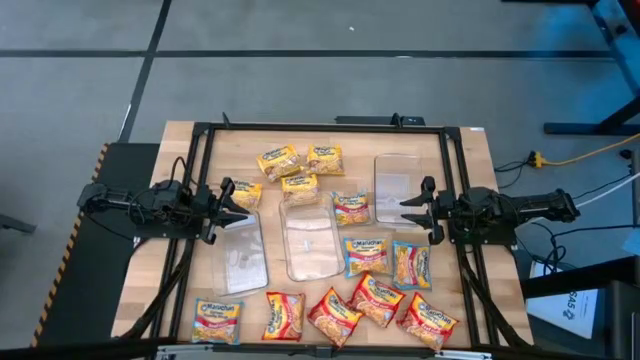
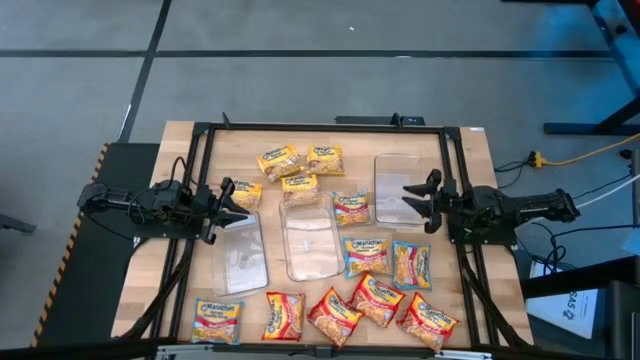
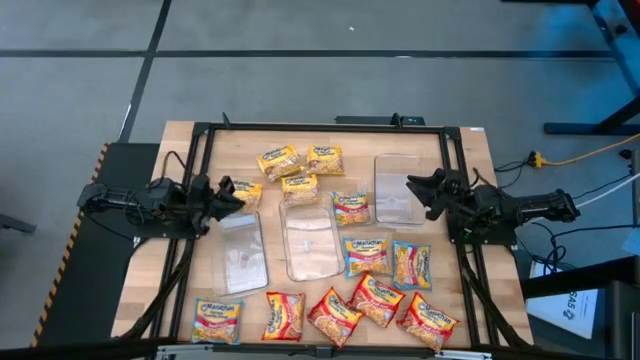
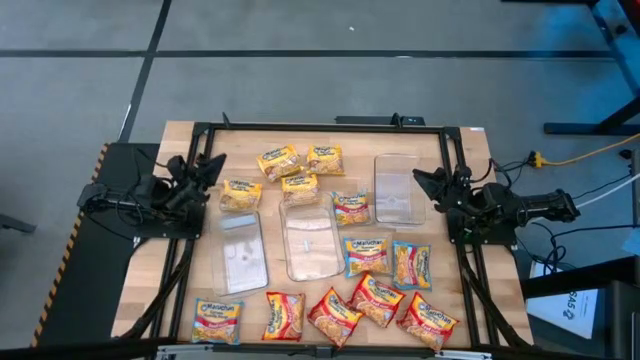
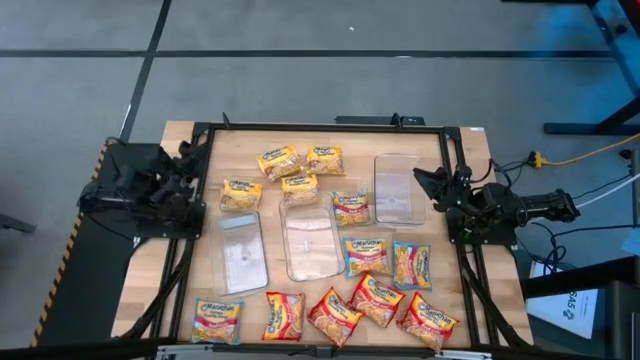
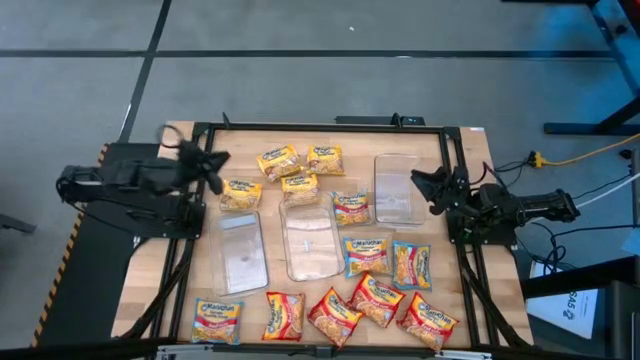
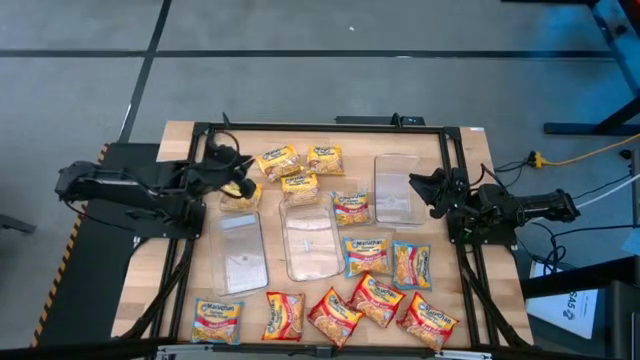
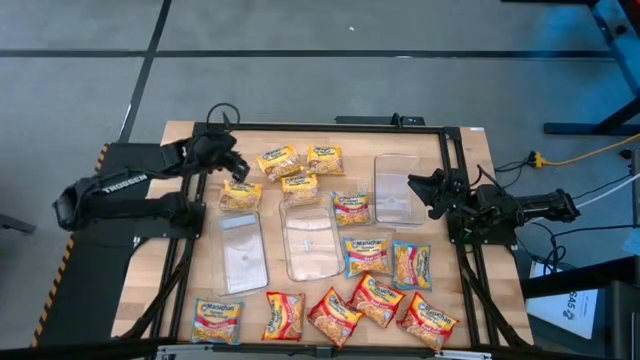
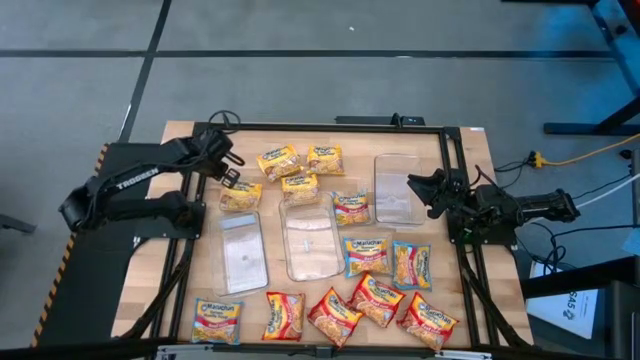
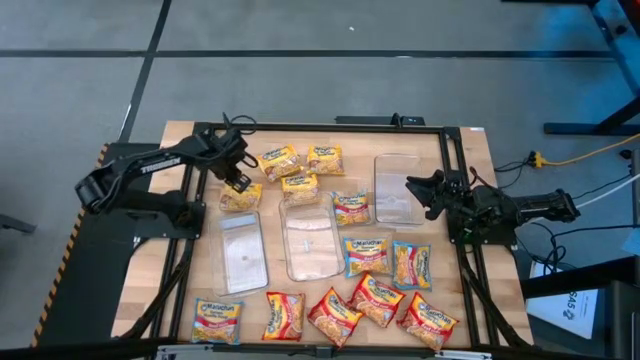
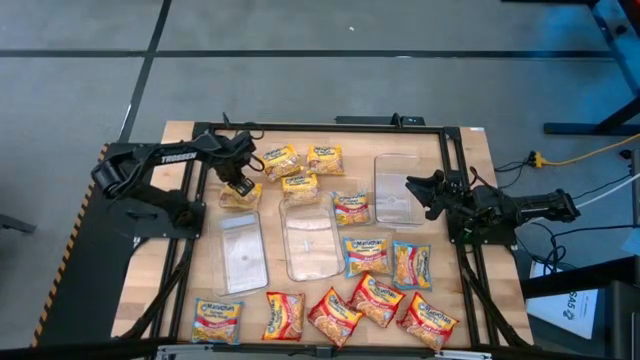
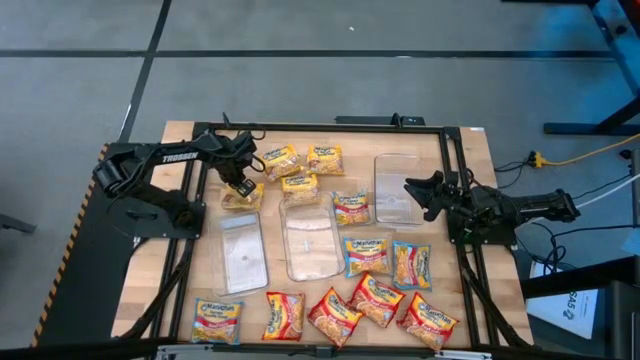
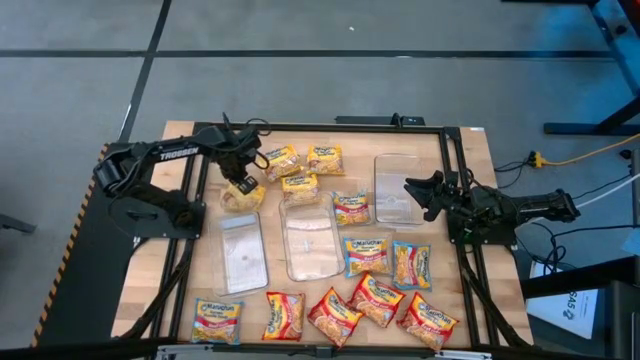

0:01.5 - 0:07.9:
Task: Sort Maruchan noodles
Put the yellow noodle pack into the left transparent bin

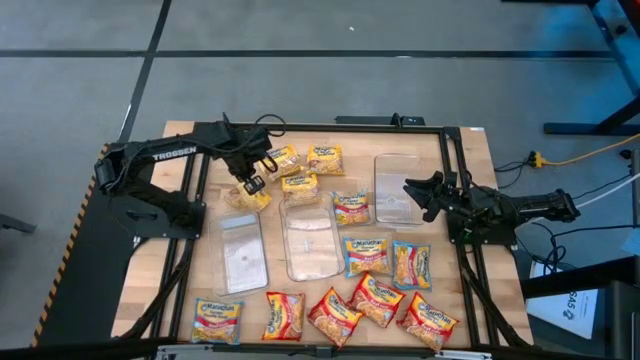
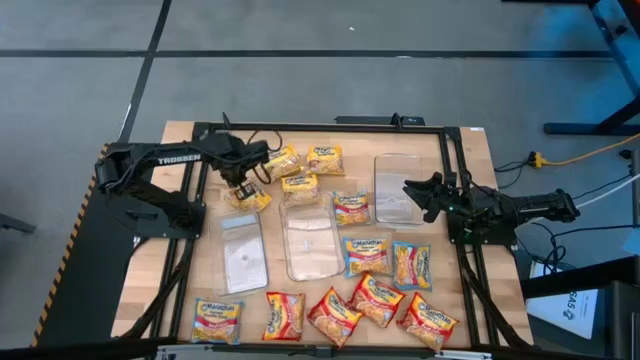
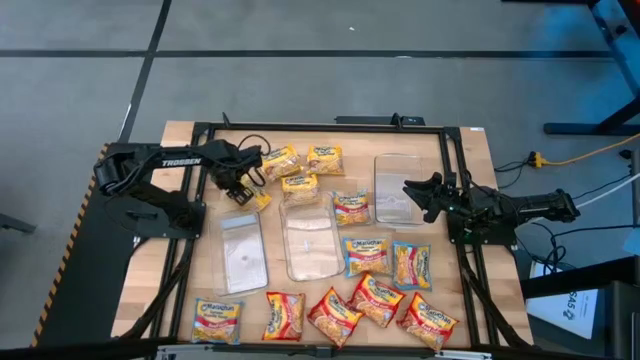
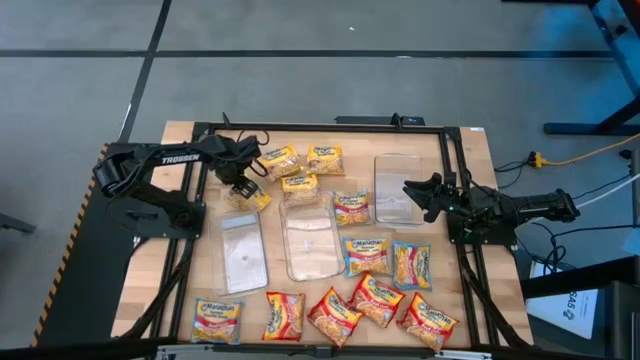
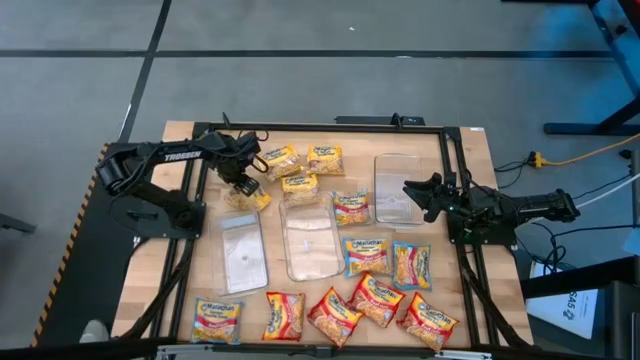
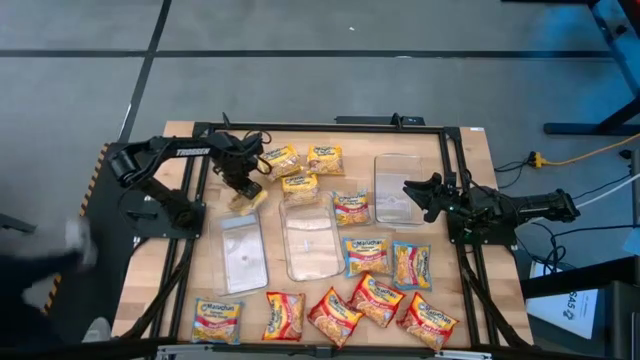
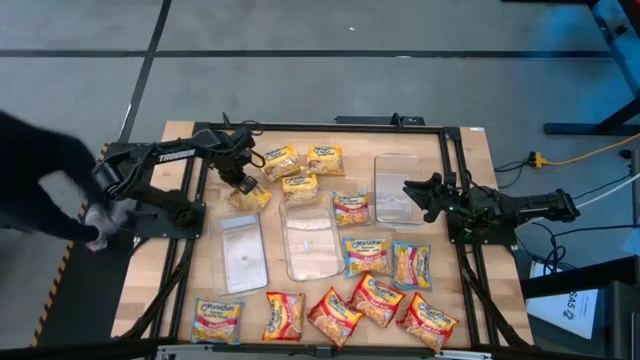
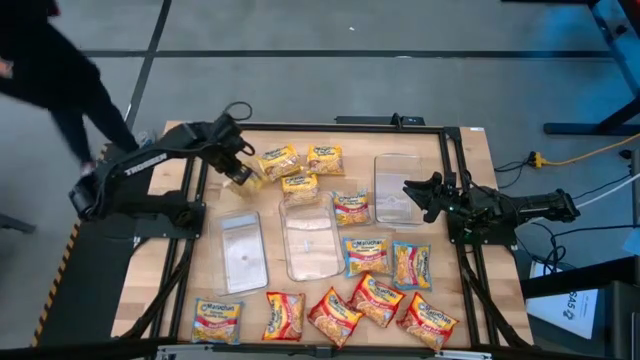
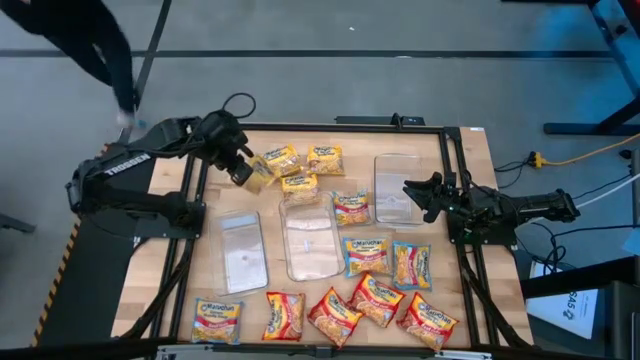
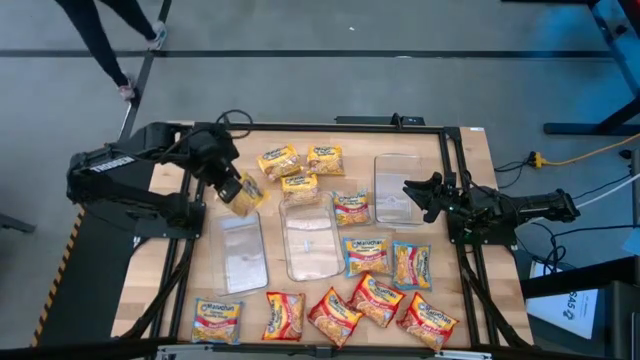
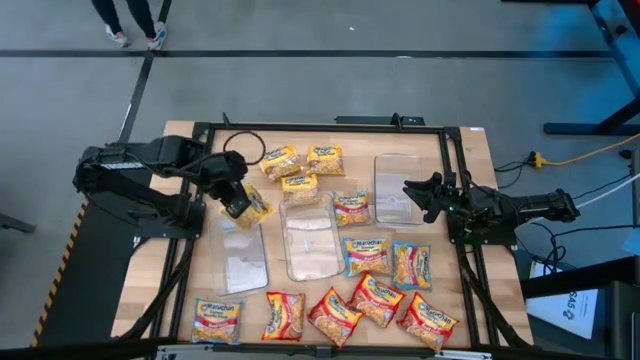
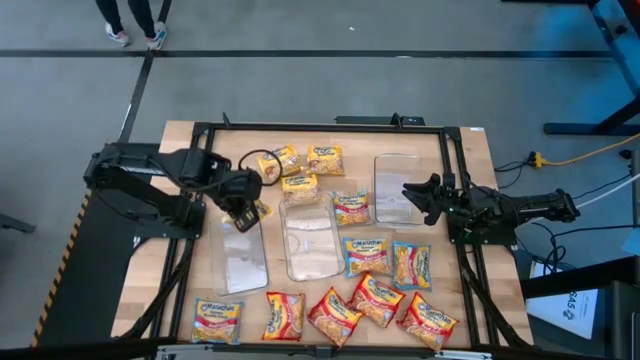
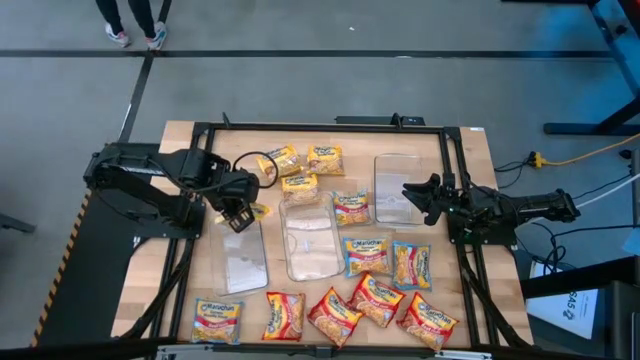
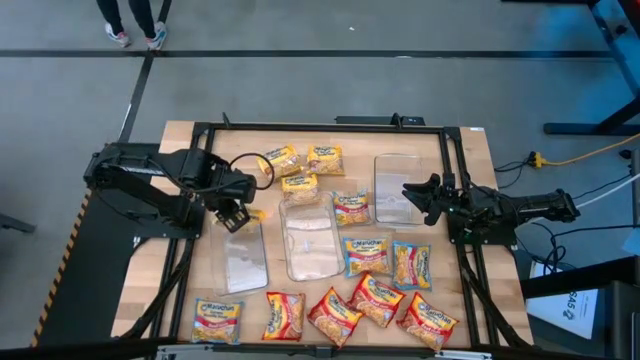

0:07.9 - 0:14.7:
Put the yellow noodle pack into the left transparent bin

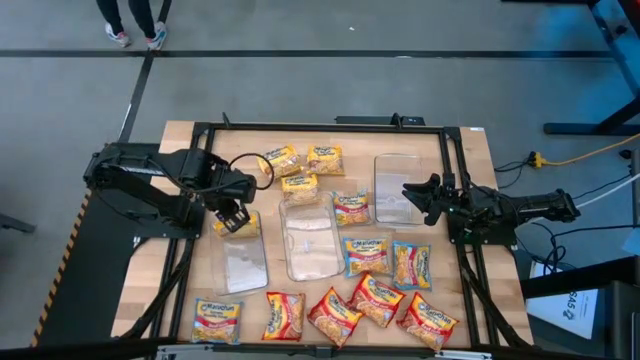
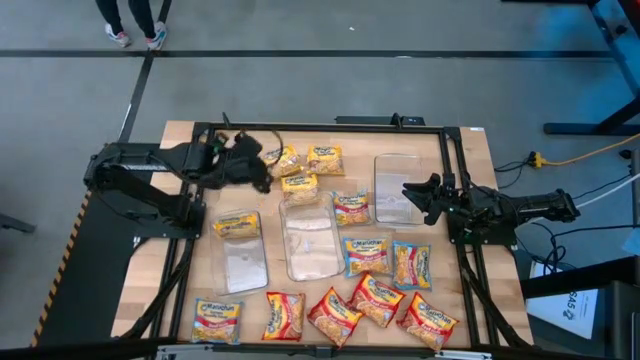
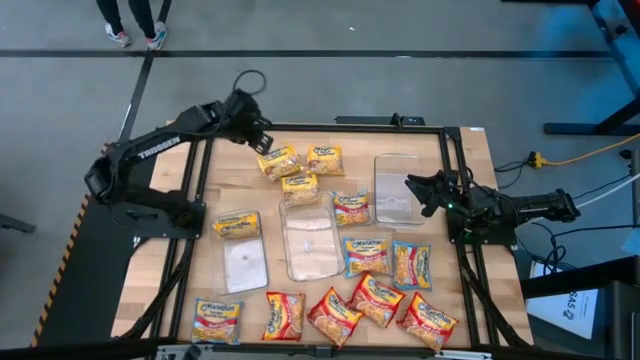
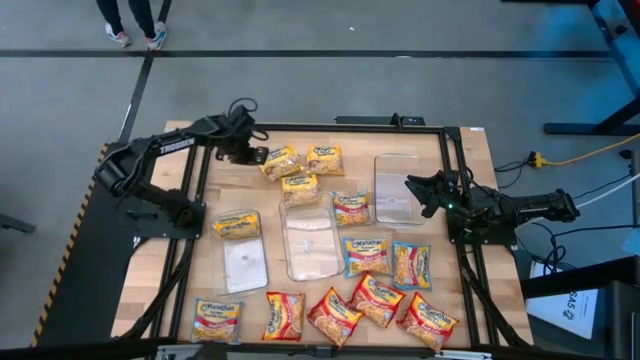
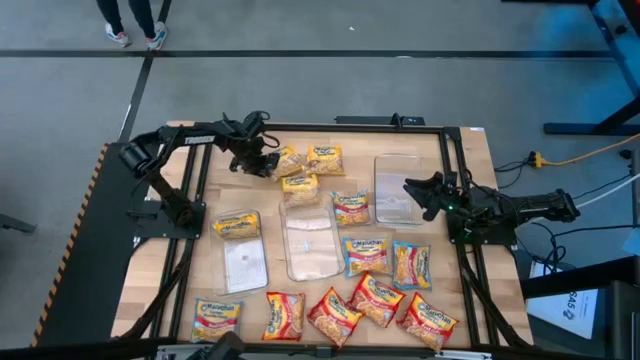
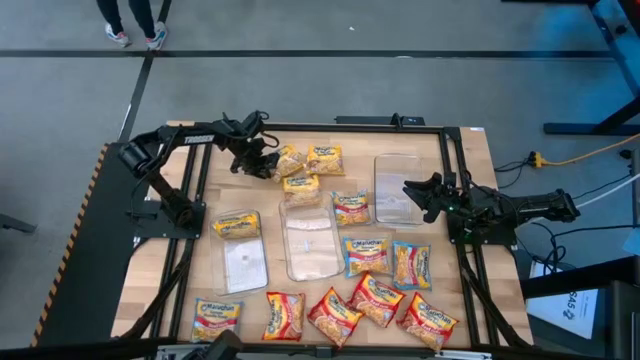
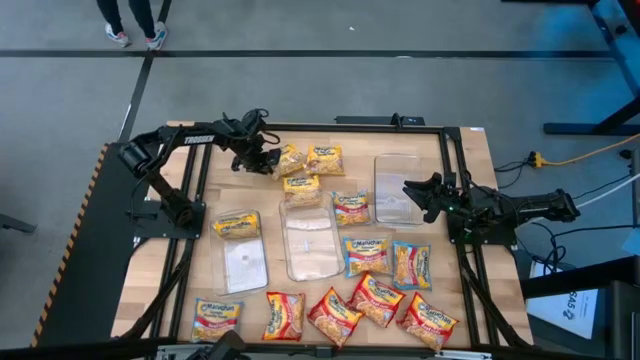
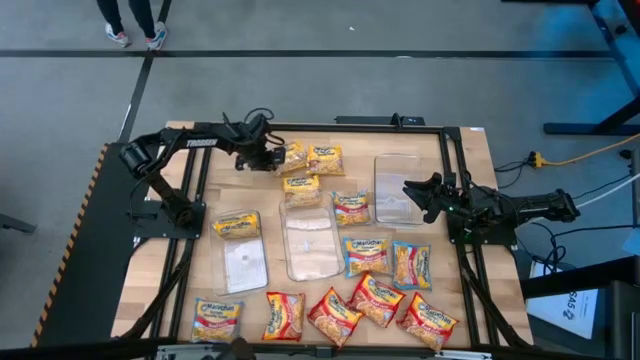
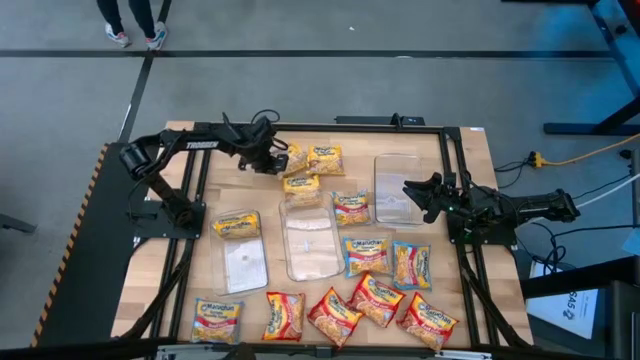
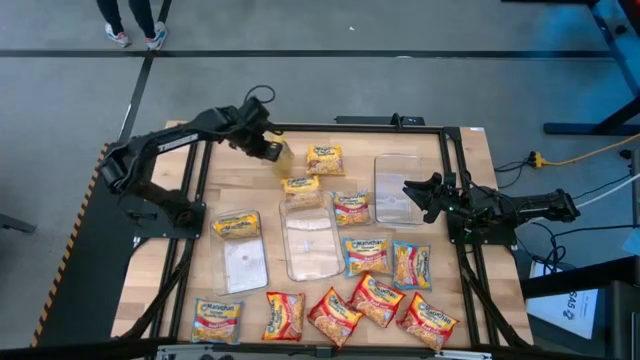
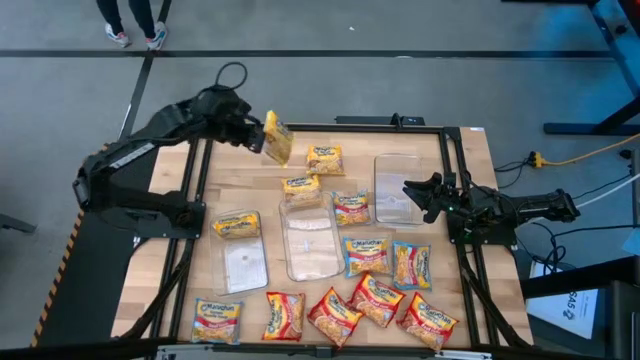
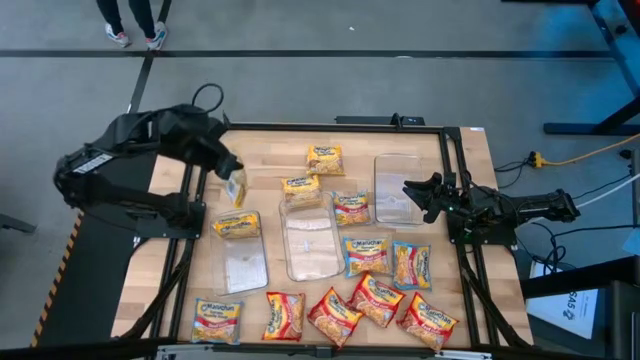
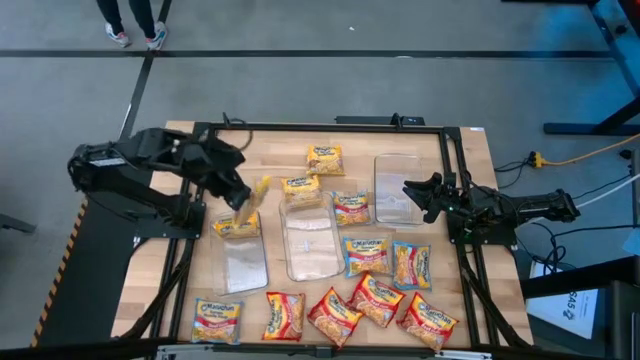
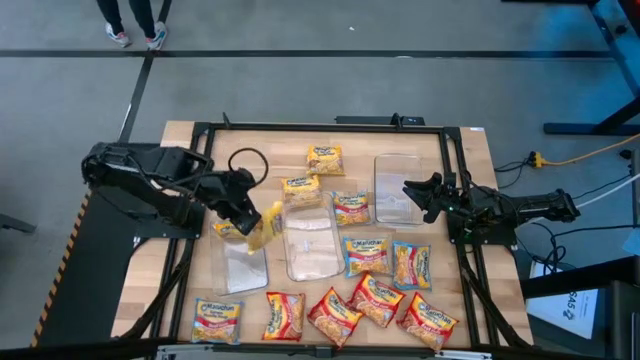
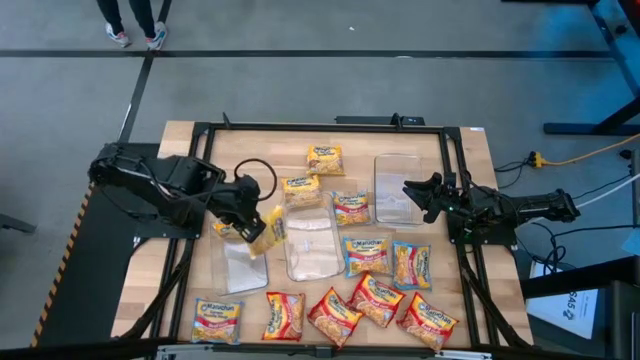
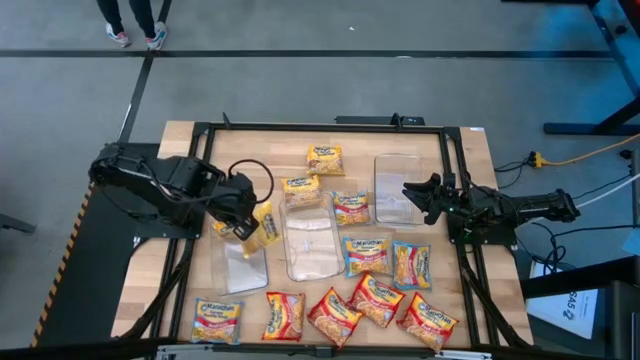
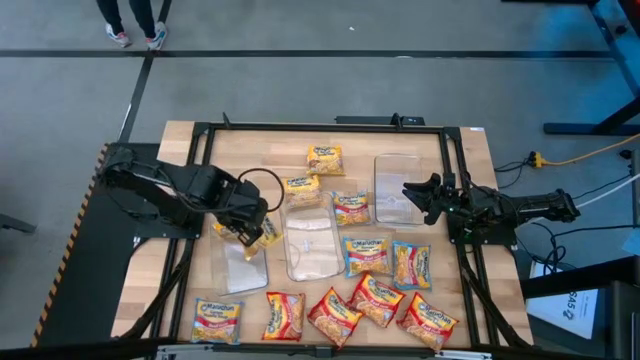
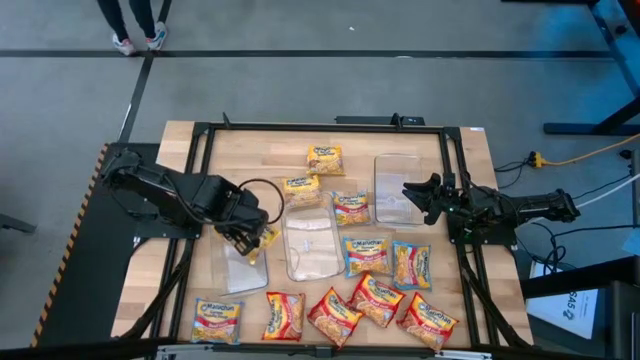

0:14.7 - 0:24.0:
Put the yellow noodle pack into the left transparent bin
